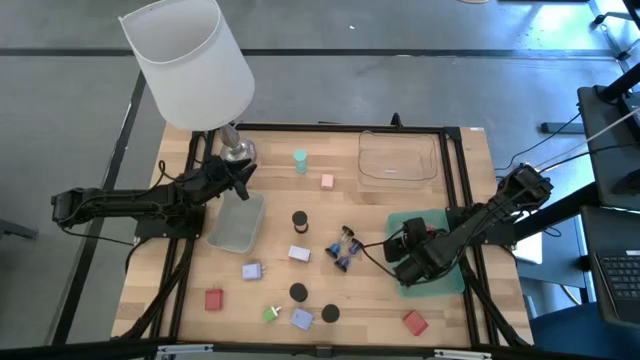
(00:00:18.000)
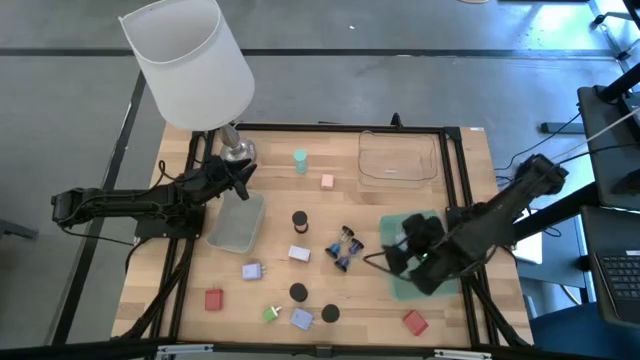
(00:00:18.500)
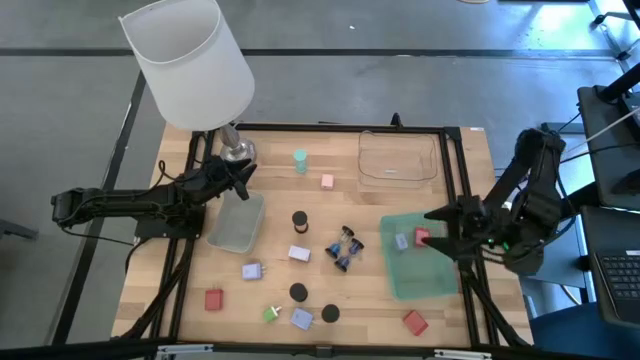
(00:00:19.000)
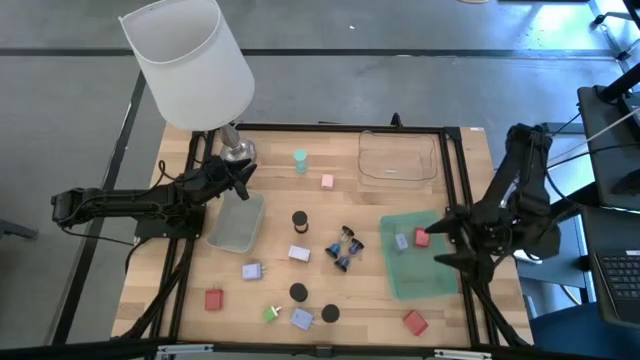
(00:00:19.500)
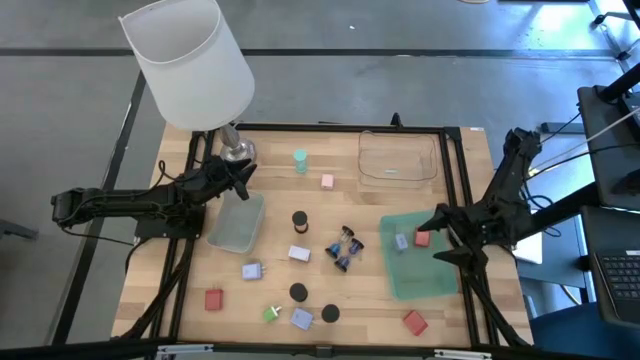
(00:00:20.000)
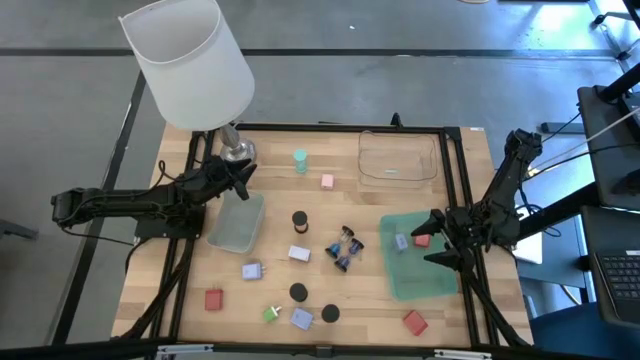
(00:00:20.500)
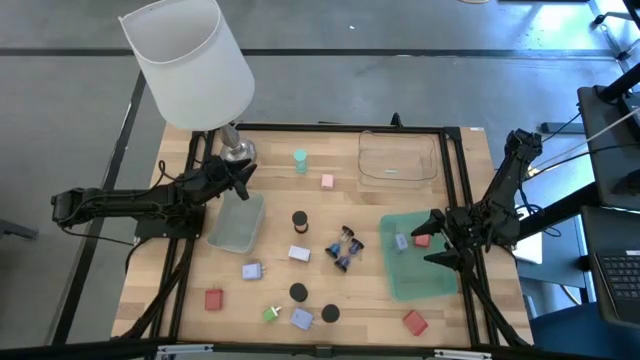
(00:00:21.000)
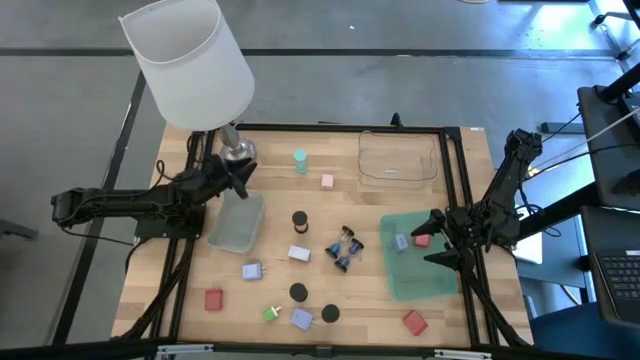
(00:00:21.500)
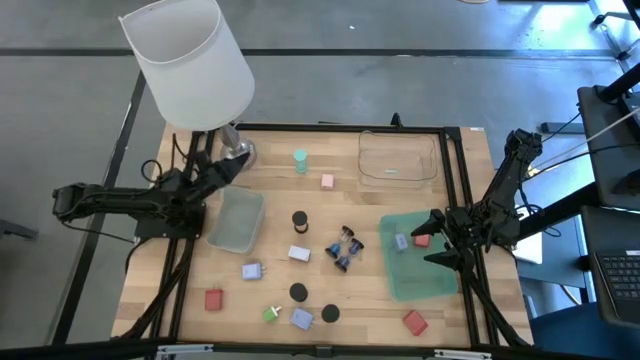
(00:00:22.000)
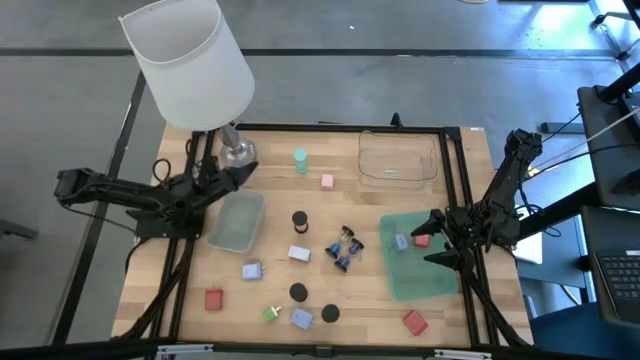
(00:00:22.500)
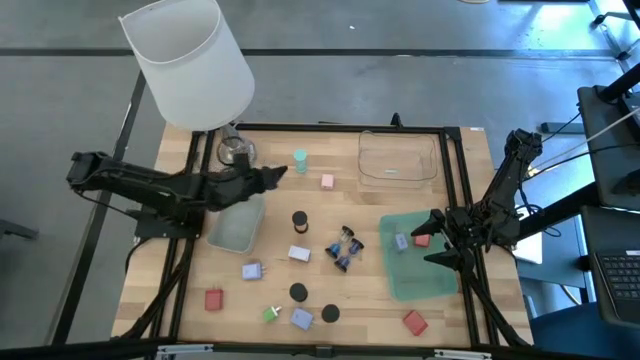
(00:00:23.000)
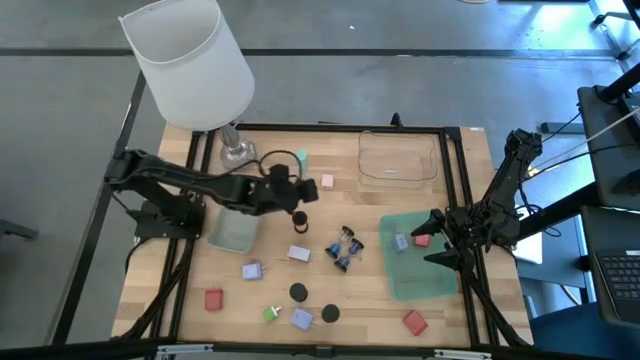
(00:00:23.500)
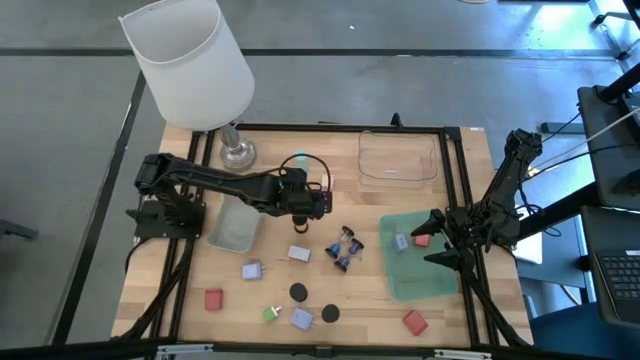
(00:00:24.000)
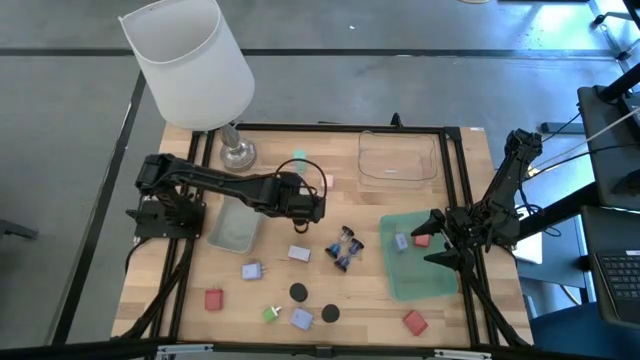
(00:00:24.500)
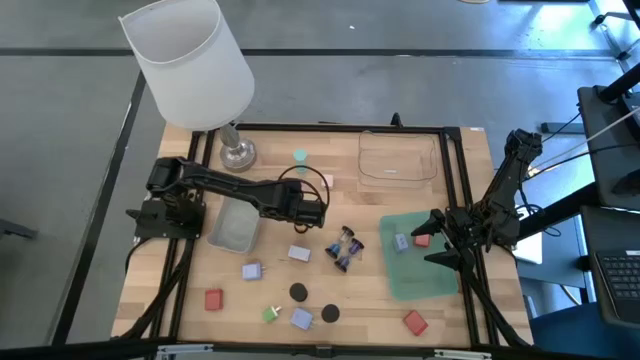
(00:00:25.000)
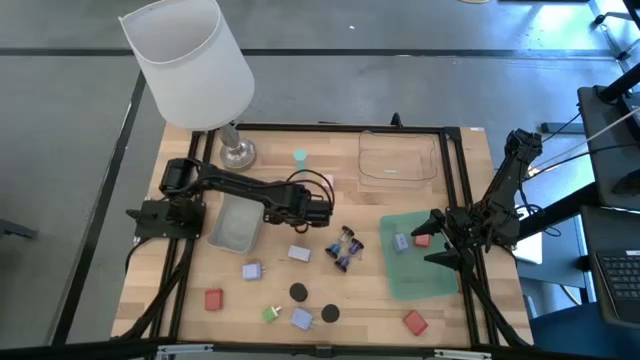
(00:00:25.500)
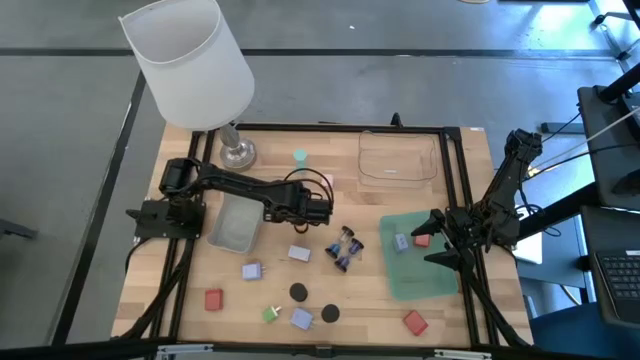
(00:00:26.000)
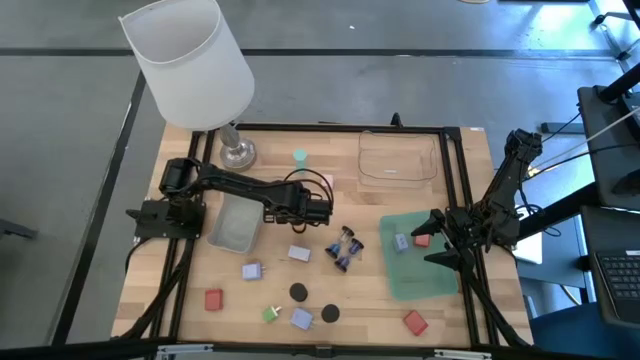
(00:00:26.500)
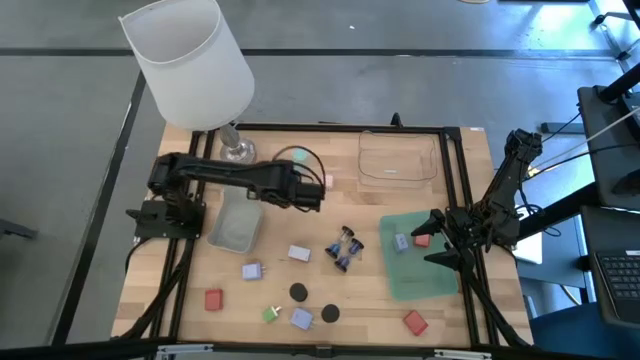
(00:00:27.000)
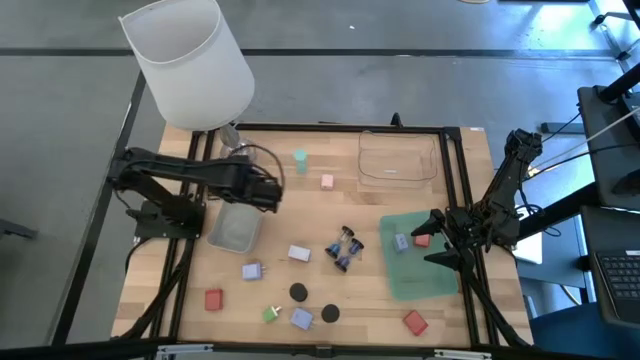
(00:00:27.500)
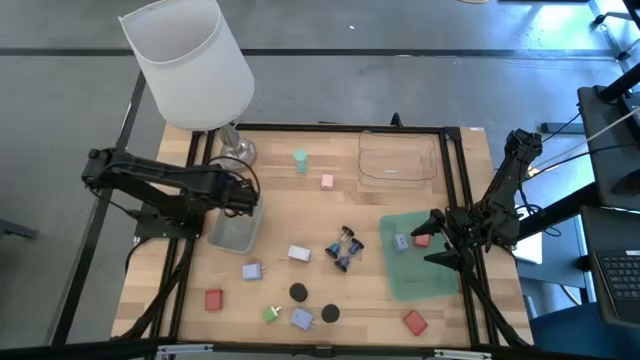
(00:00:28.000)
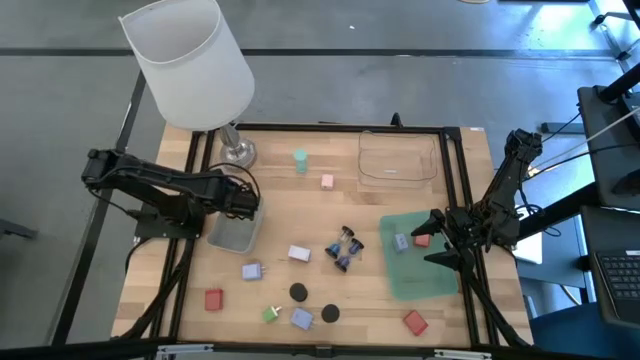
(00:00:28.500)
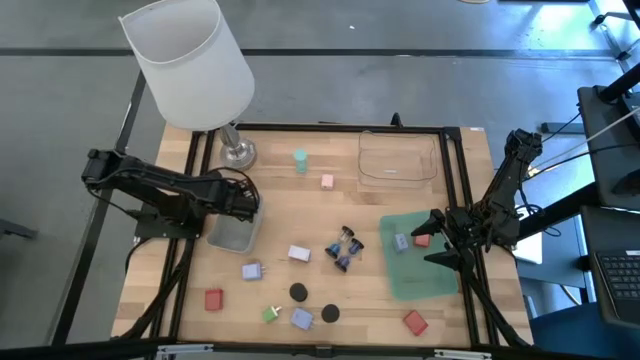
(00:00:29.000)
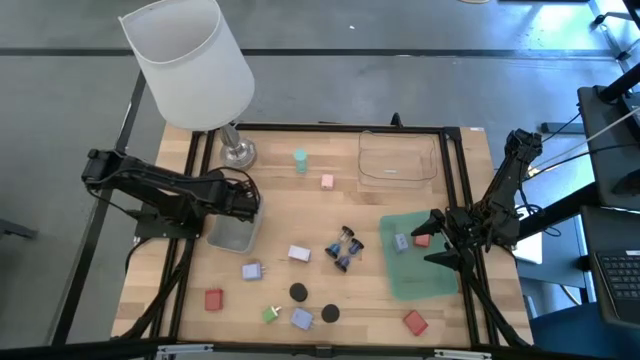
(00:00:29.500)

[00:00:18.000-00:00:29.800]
Task: Pick & Place Office items
Put the orange hourglass into the gray bin

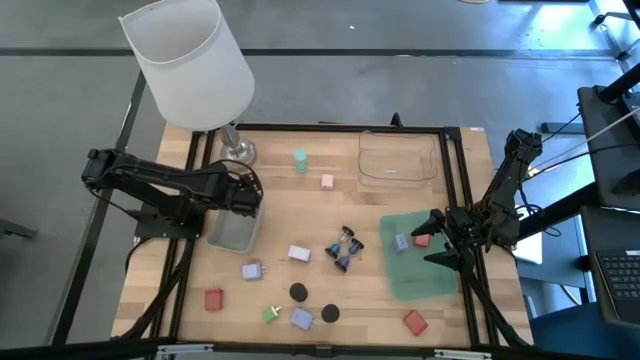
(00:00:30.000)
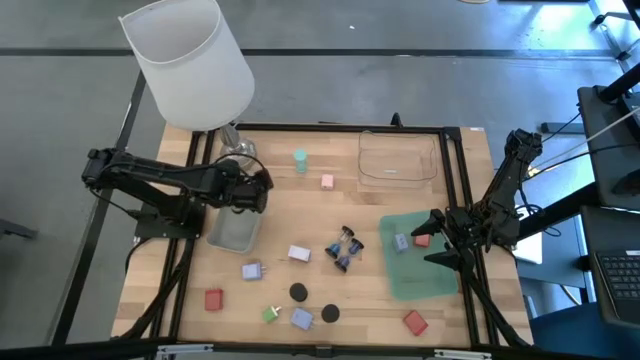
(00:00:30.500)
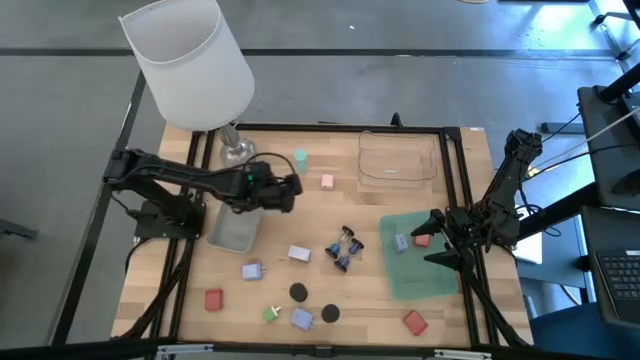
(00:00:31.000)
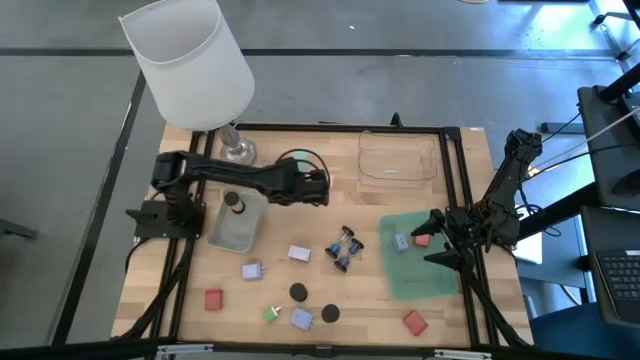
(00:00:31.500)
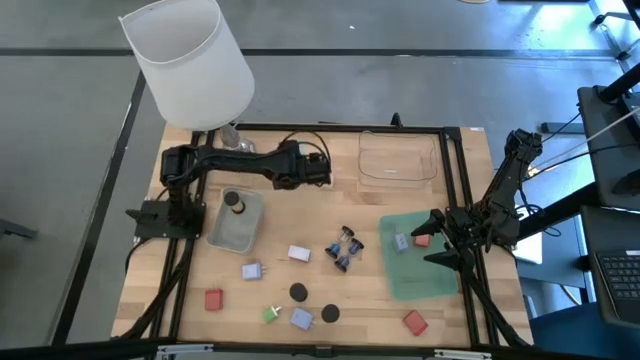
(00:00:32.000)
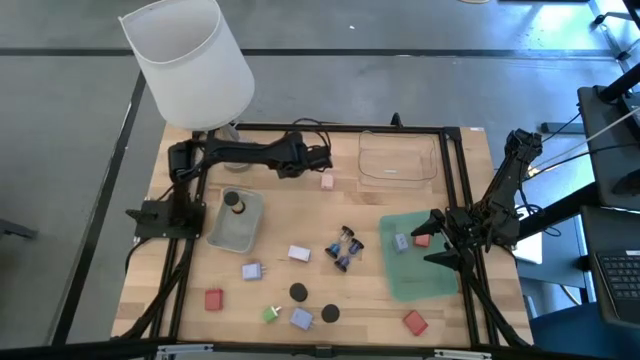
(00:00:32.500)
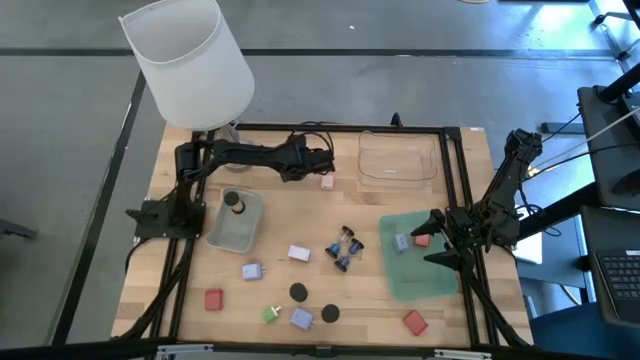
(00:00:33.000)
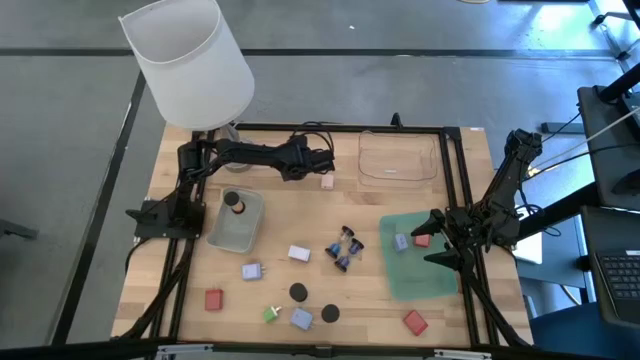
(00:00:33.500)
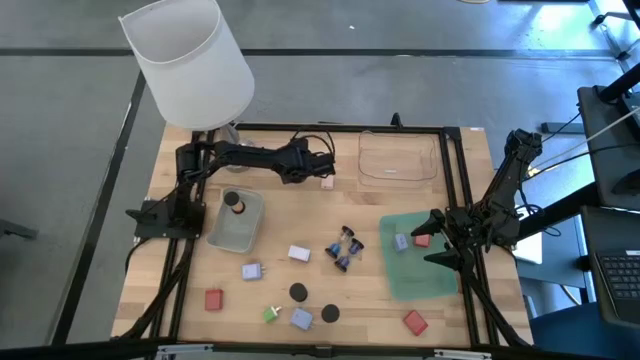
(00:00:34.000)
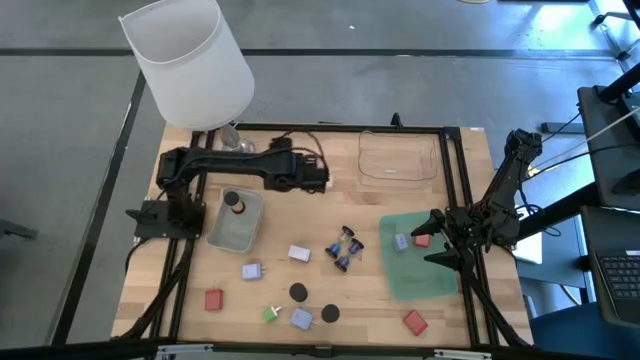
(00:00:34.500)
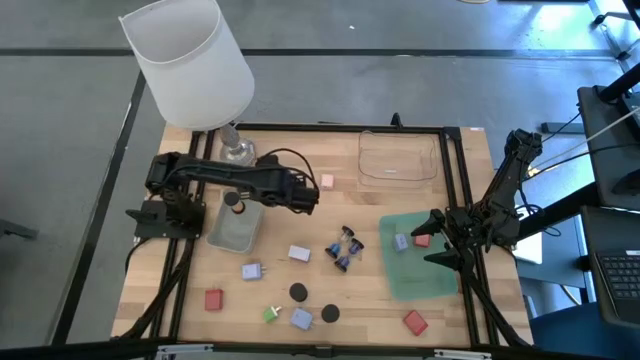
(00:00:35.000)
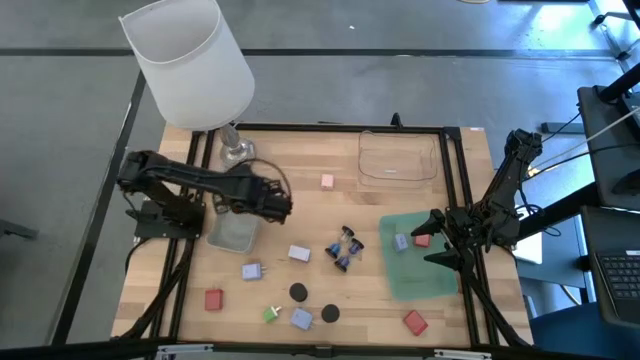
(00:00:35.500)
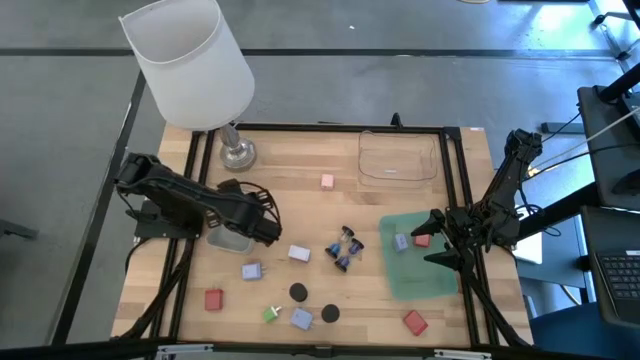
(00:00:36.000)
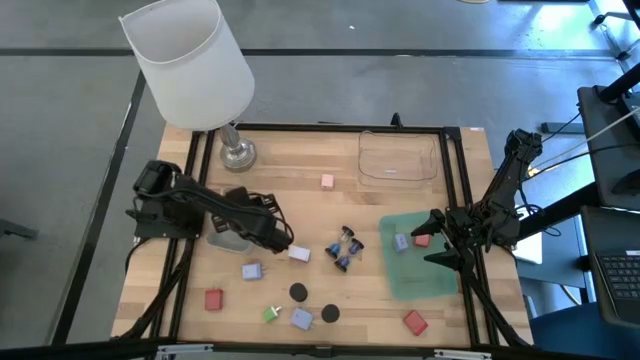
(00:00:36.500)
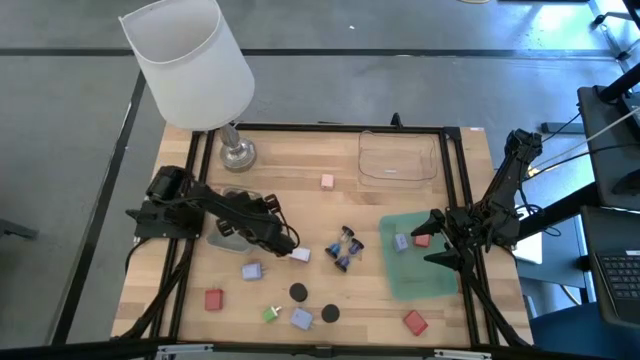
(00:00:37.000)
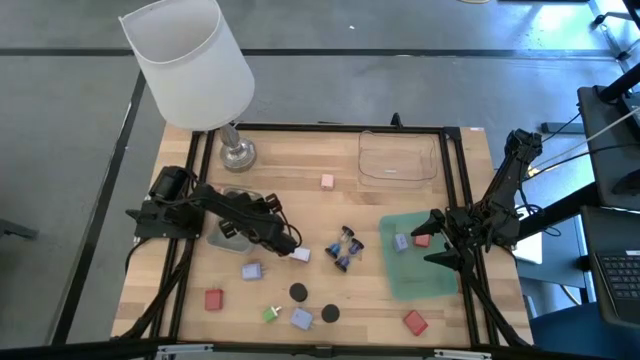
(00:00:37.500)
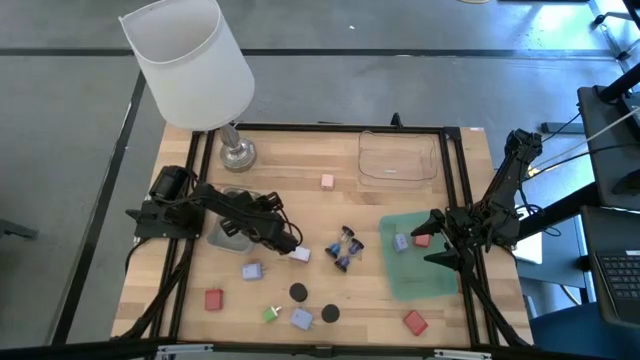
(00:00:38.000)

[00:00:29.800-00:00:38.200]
Put the light blue hourglass into the gray bin
